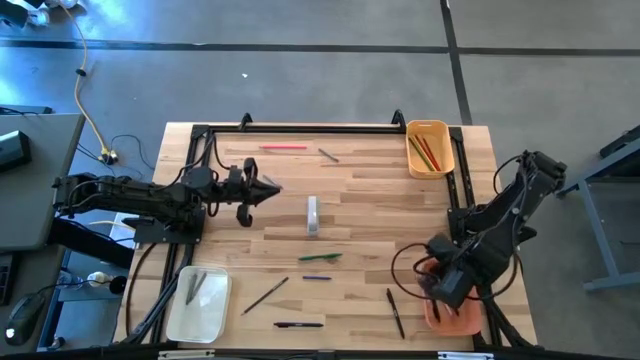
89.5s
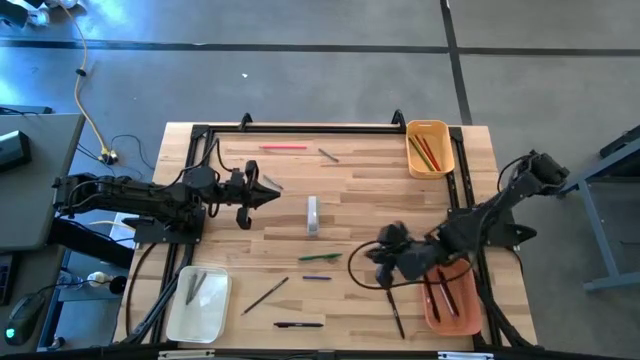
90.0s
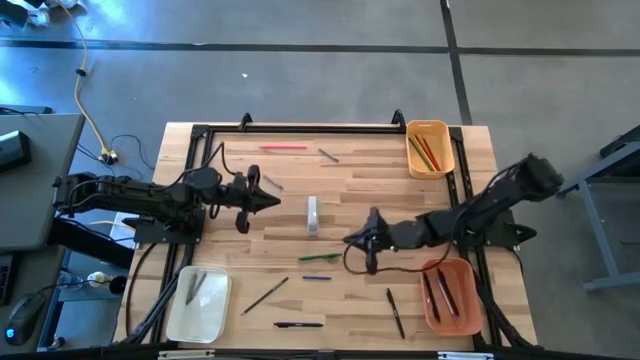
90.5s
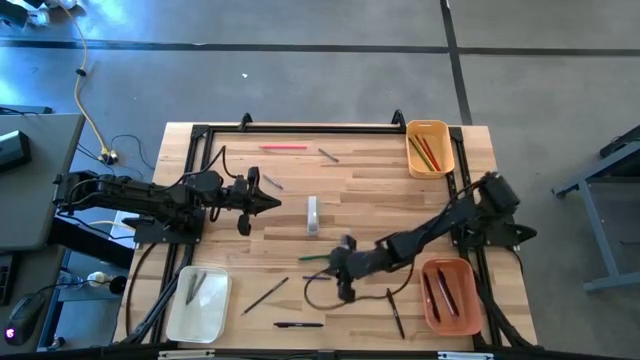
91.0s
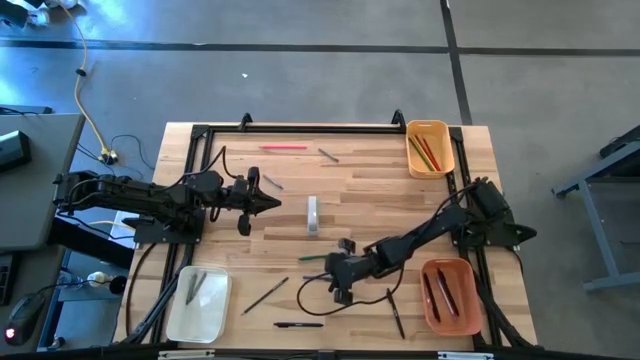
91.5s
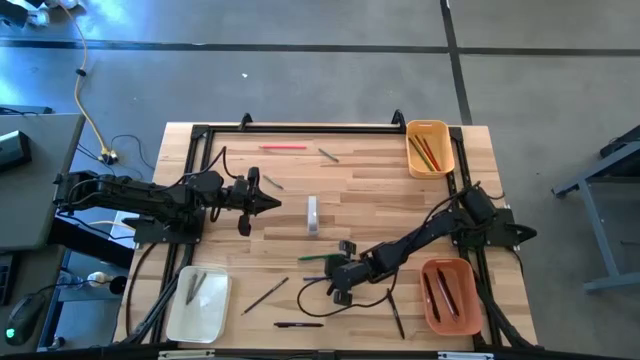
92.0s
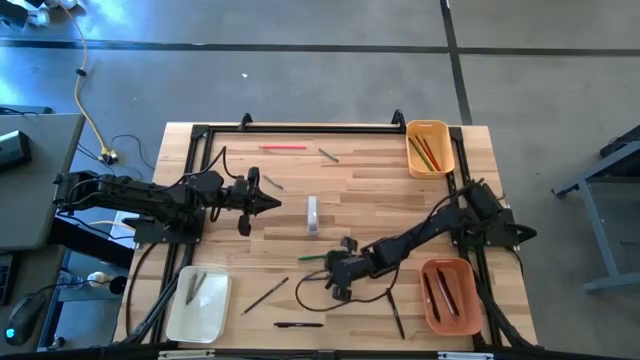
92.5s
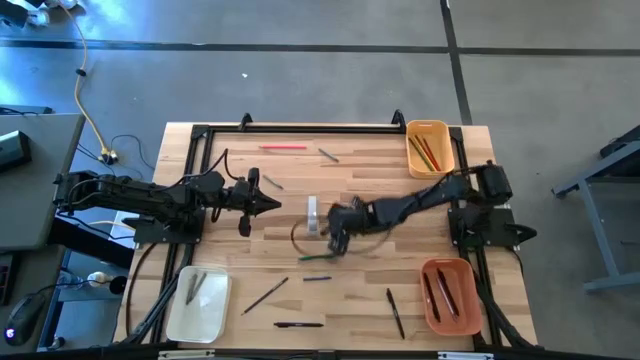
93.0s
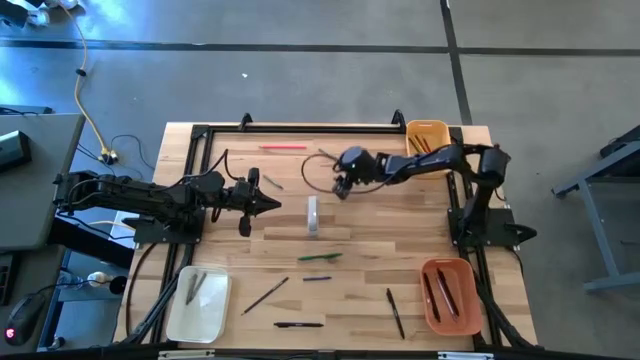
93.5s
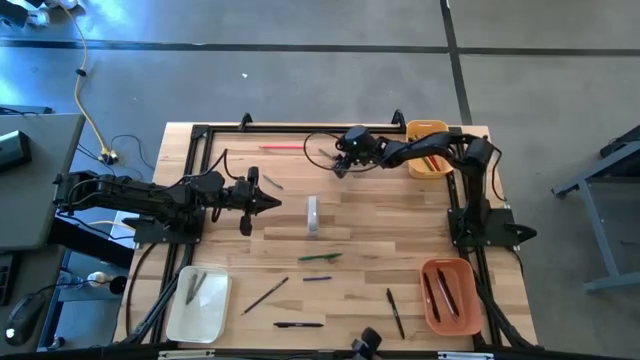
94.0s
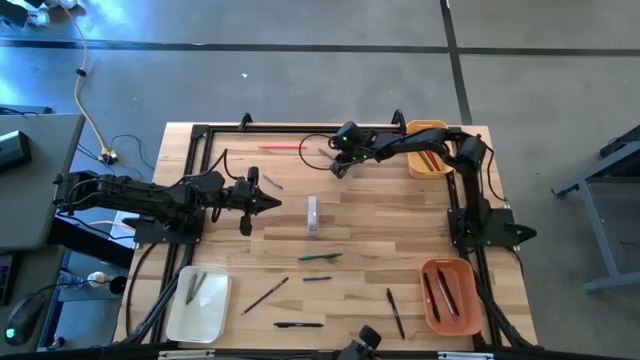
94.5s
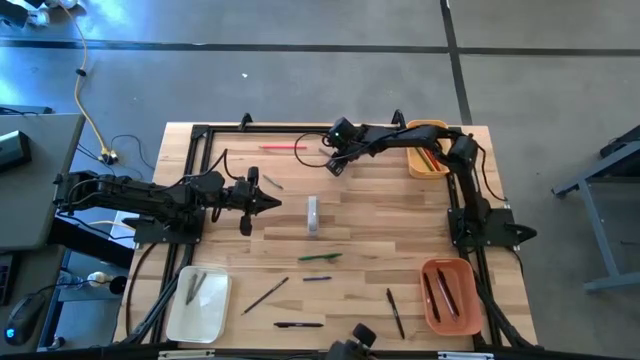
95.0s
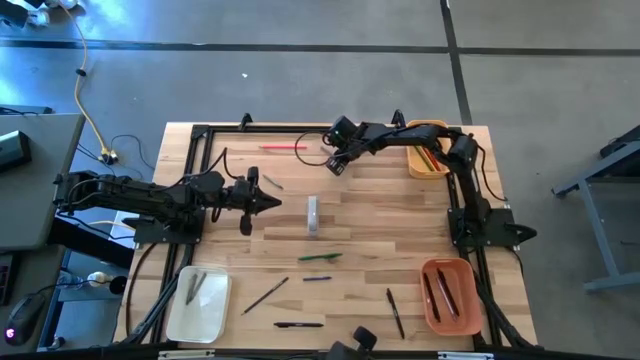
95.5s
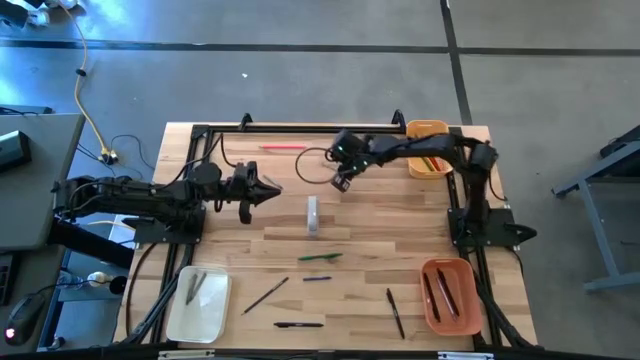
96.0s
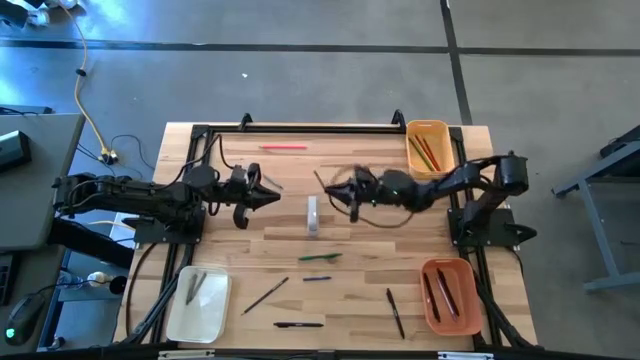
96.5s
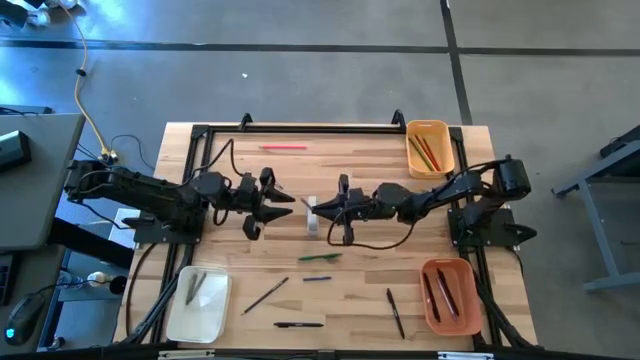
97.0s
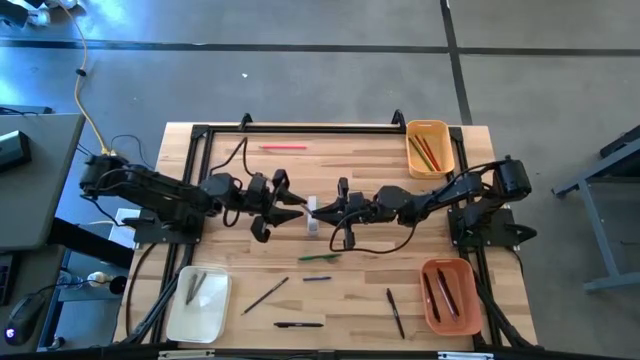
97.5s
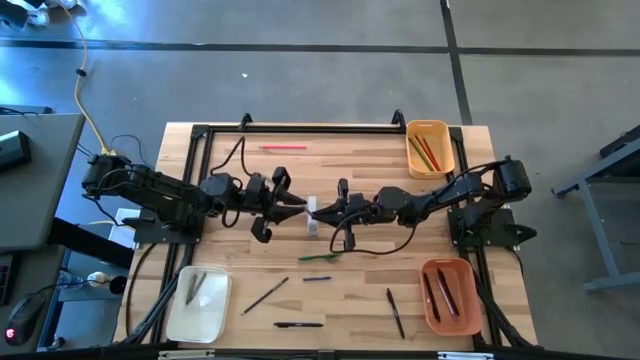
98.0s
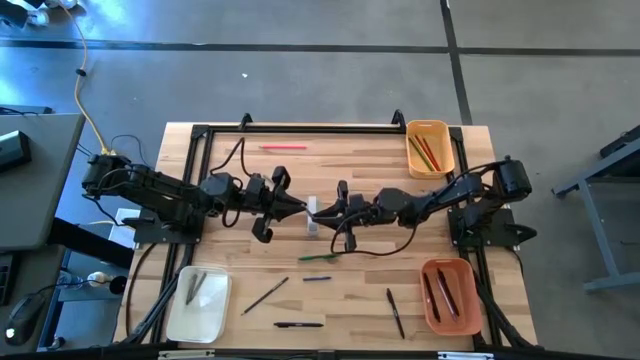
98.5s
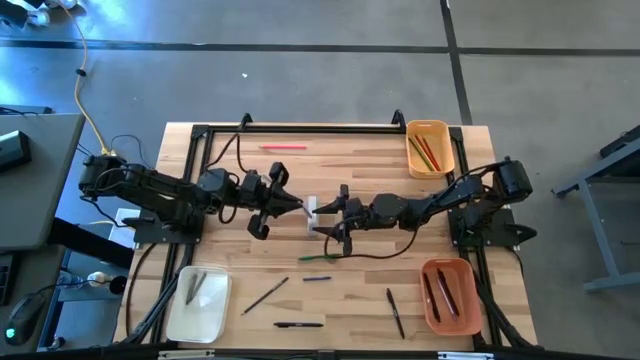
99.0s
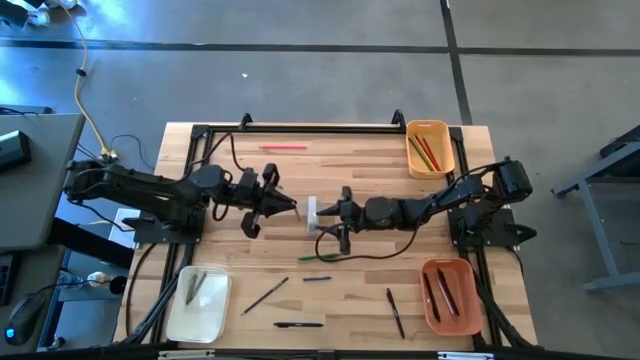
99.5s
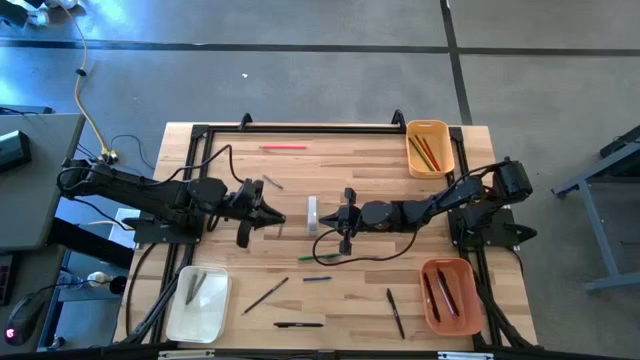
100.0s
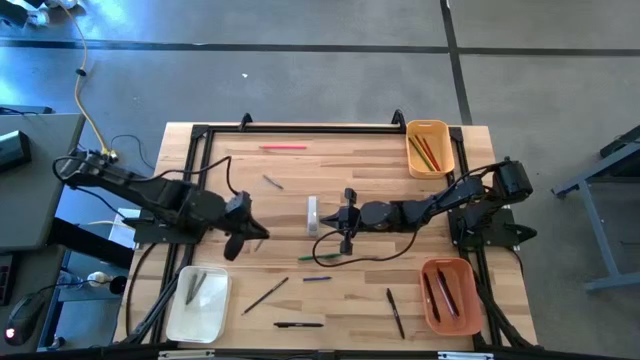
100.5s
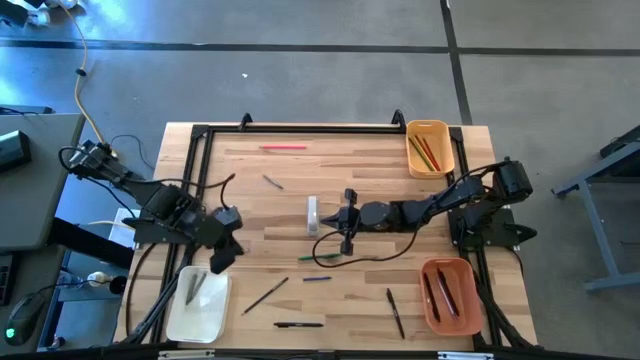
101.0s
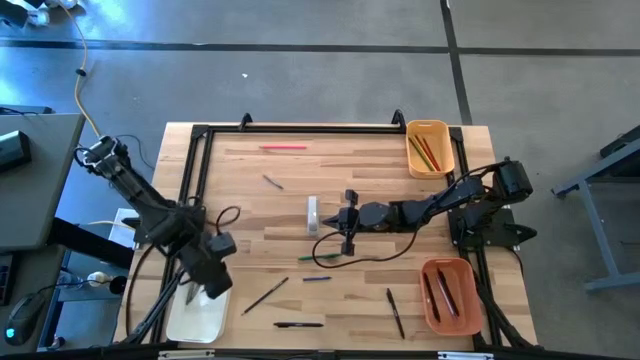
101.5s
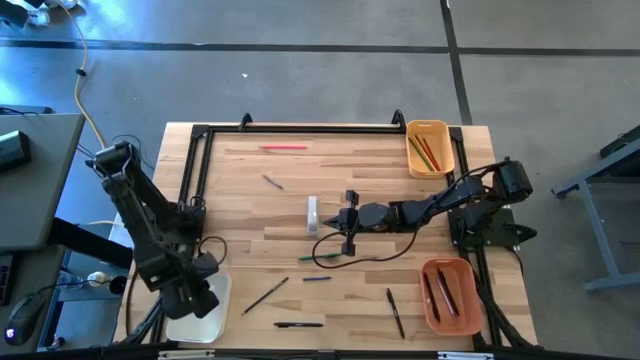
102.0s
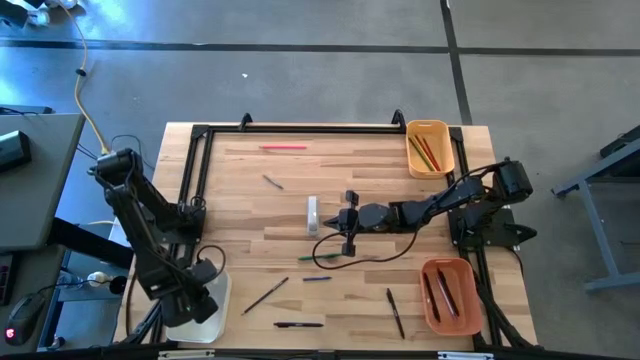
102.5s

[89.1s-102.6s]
Task: Sort crayons/erasers/pens/pencils in bins
Put the gray crayon into the white bin

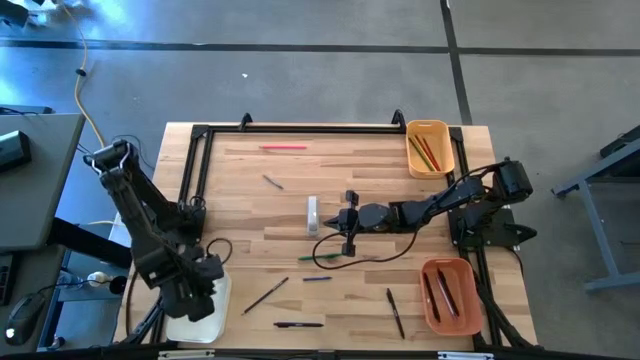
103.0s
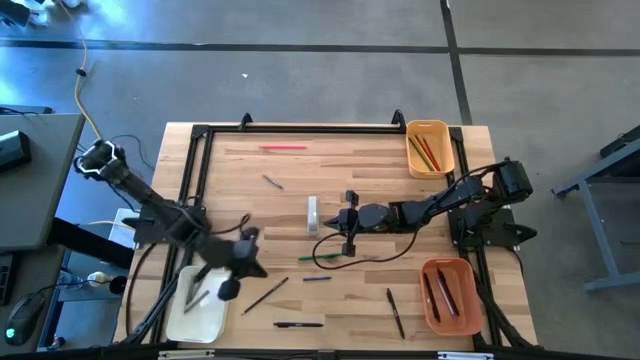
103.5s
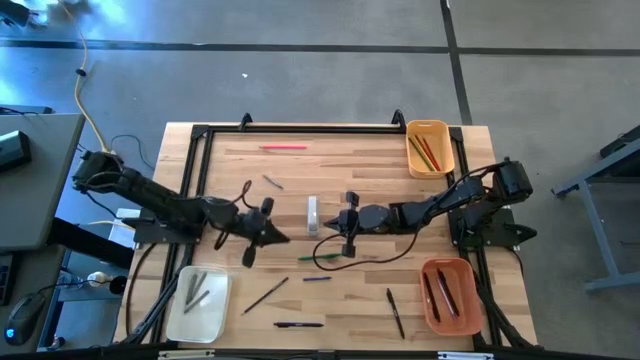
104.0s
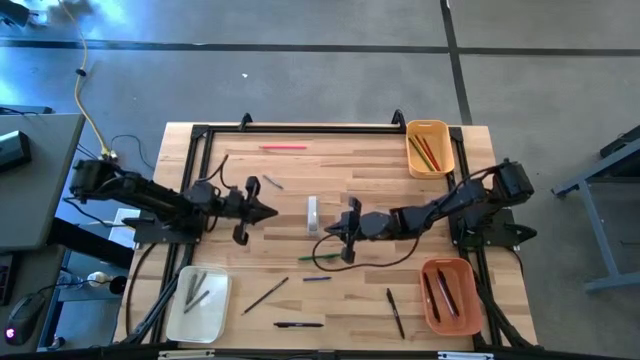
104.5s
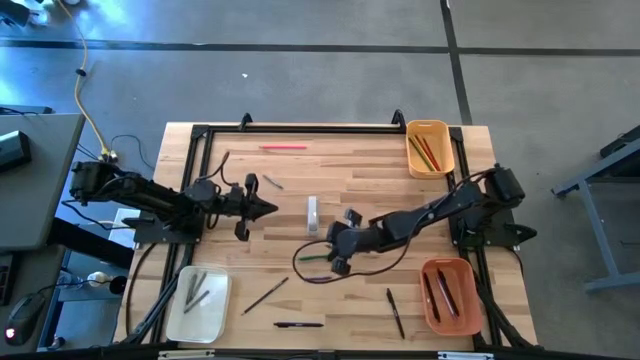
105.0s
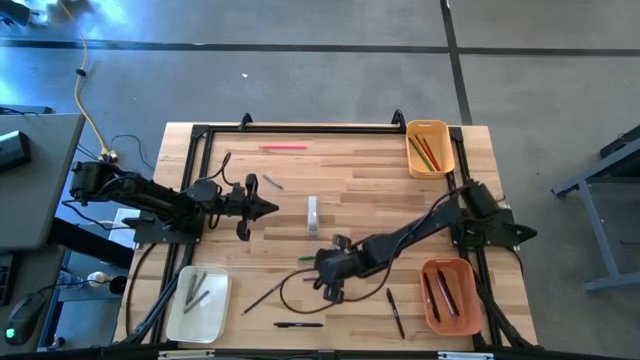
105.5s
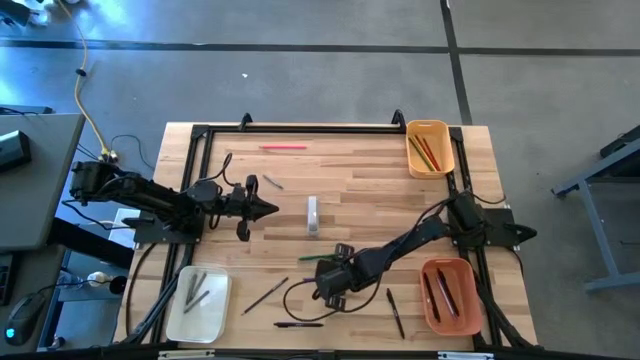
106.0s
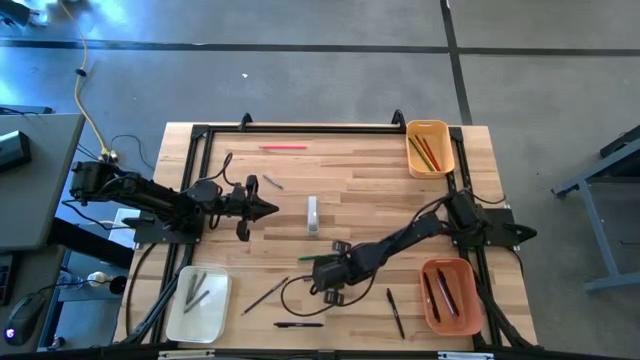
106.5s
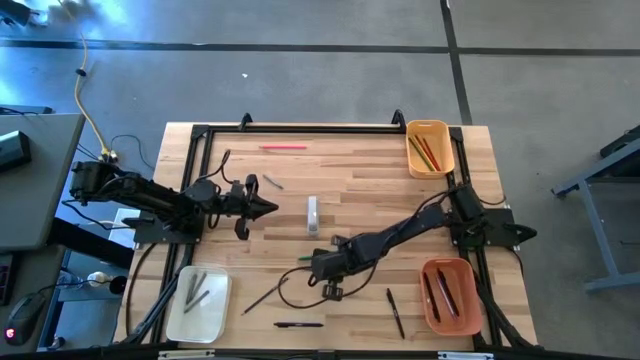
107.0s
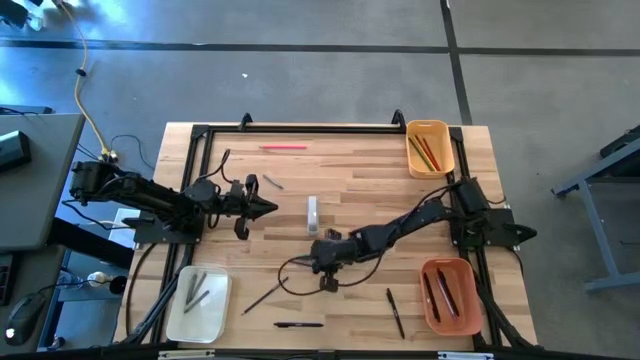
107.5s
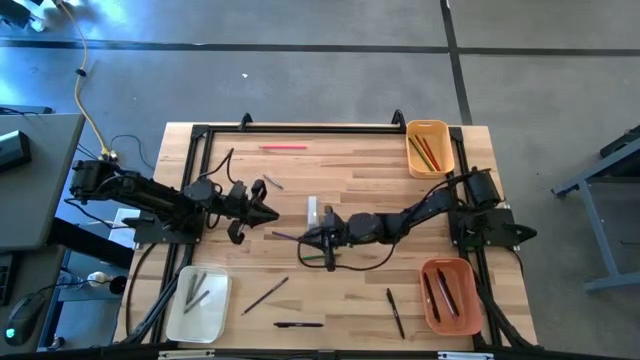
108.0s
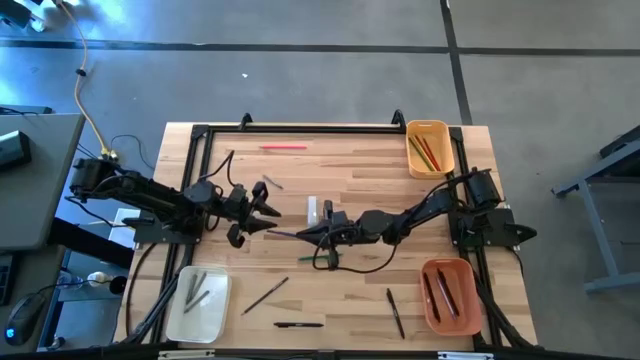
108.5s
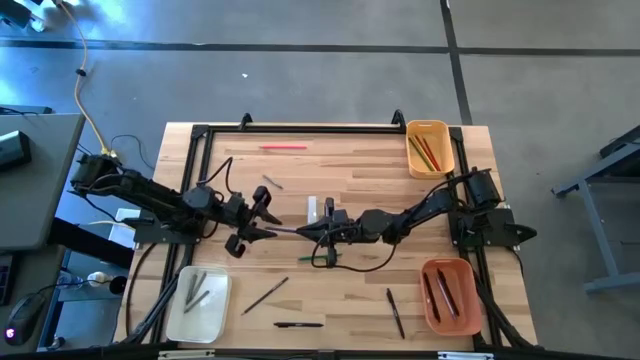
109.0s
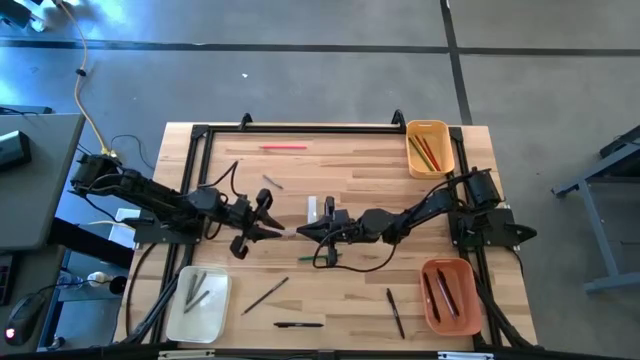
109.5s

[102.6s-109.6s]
Put the blue crayon into the white bin

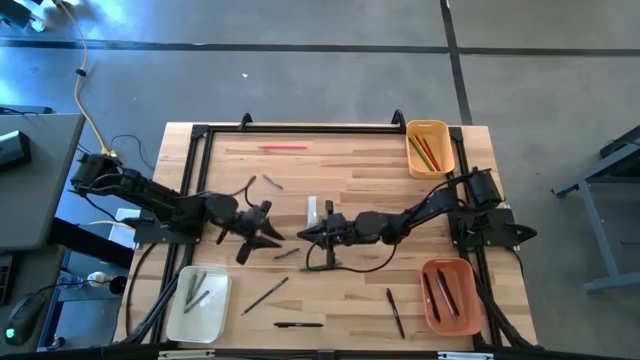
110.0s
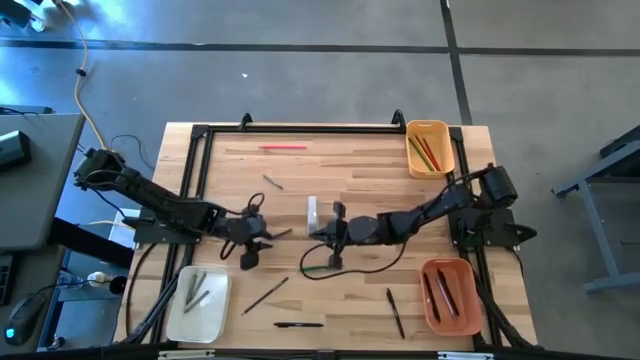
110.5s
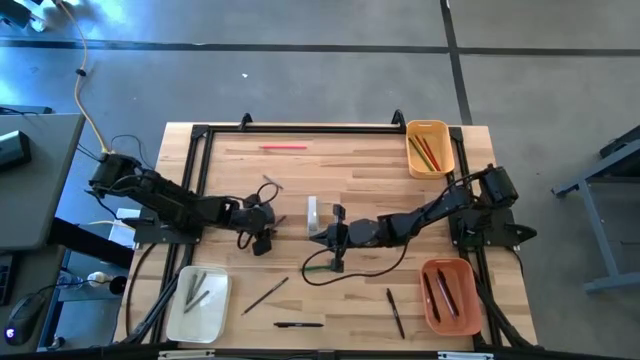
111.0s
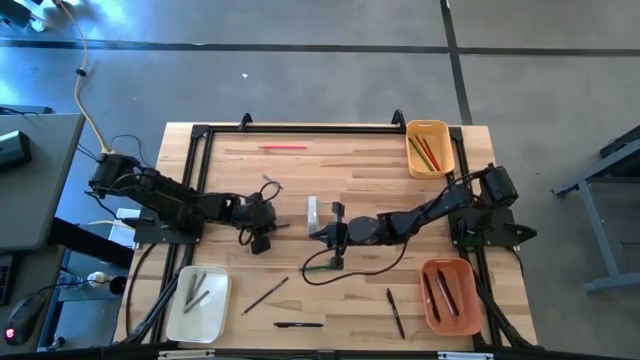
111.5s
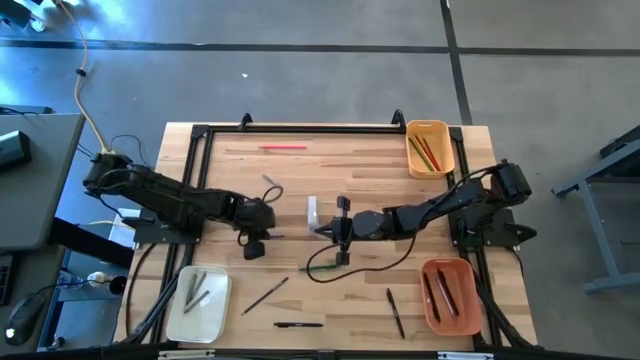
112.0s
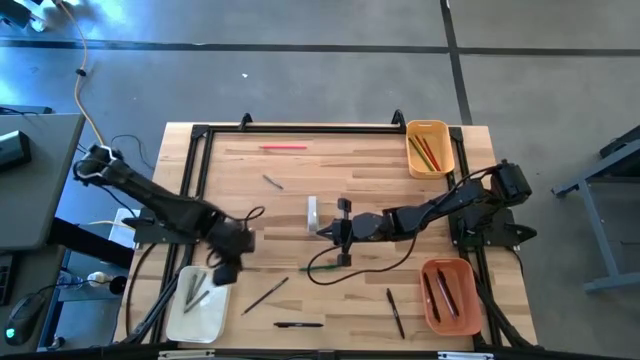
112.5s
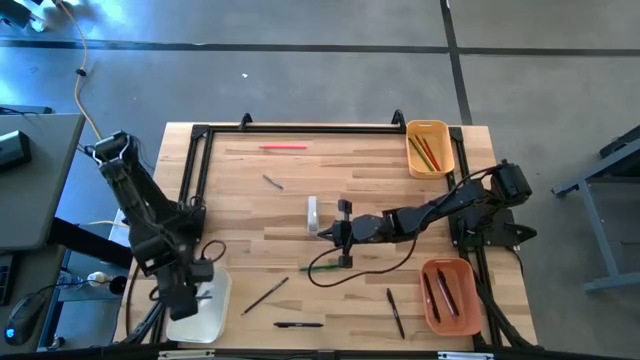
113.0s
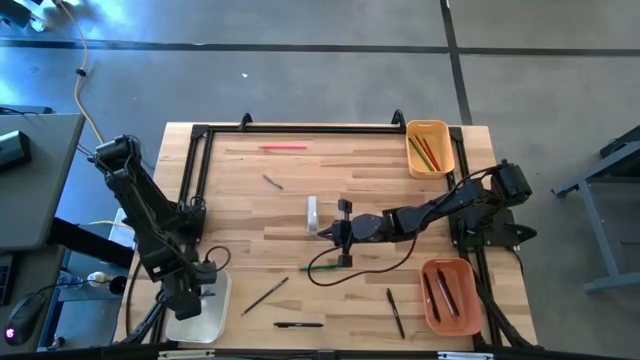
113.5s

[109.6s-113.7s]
Put the blue crayon into the white bin
